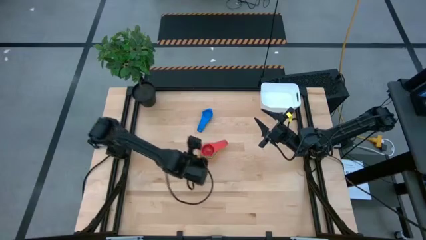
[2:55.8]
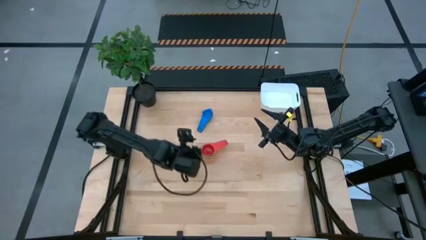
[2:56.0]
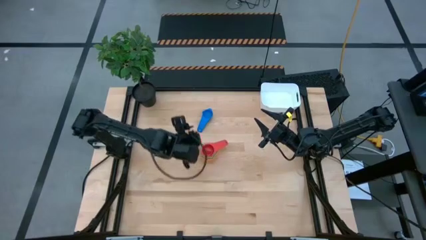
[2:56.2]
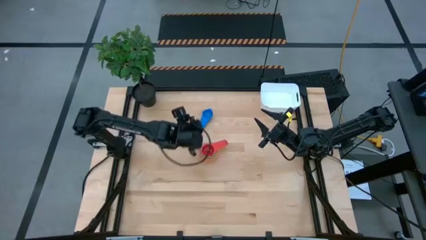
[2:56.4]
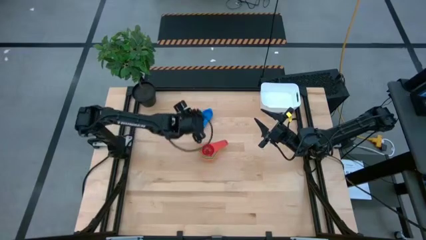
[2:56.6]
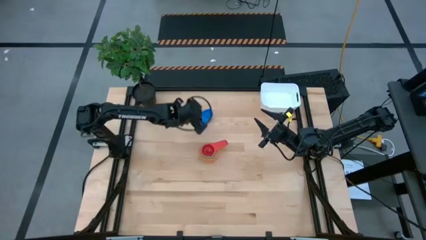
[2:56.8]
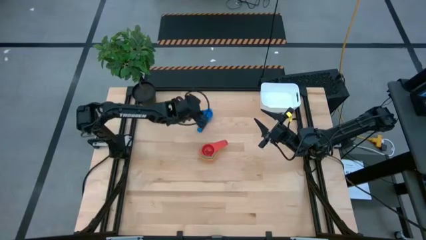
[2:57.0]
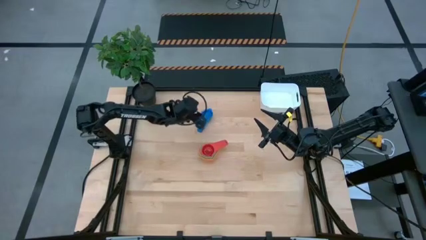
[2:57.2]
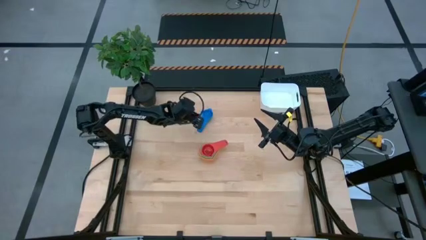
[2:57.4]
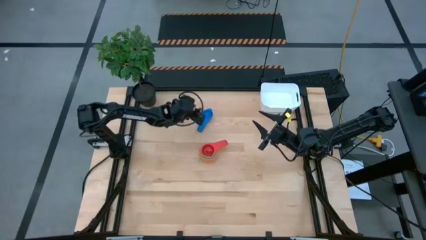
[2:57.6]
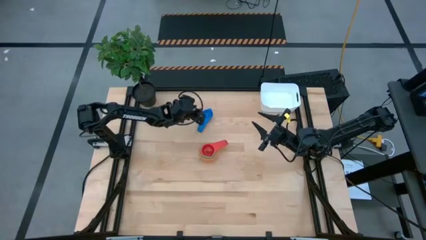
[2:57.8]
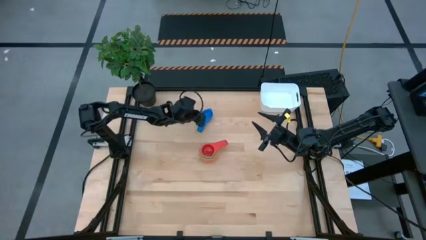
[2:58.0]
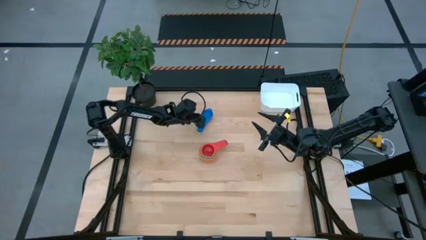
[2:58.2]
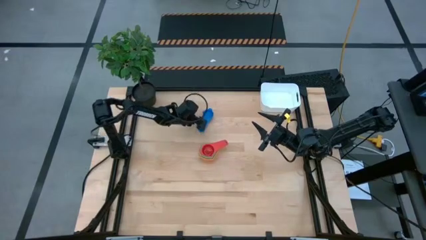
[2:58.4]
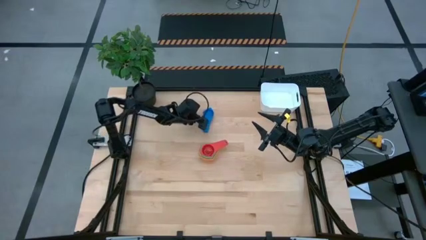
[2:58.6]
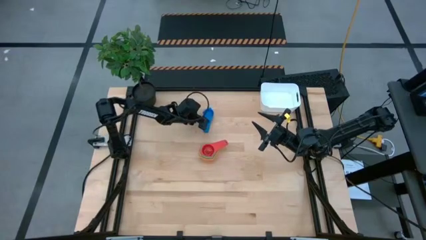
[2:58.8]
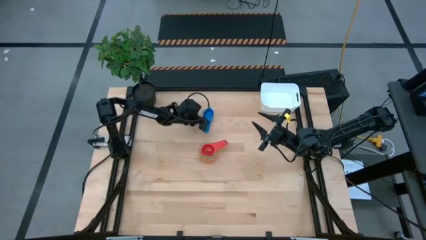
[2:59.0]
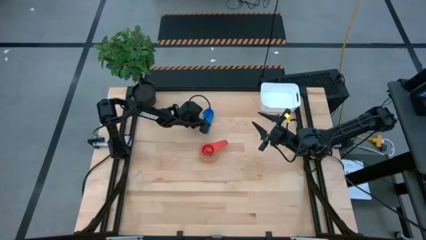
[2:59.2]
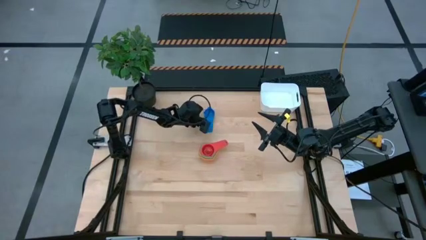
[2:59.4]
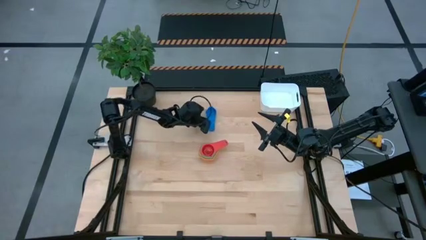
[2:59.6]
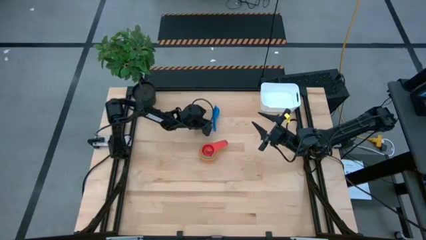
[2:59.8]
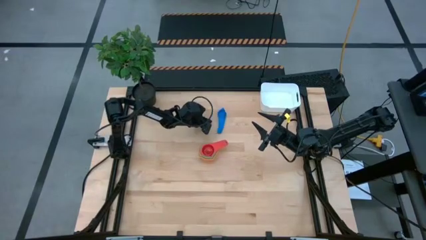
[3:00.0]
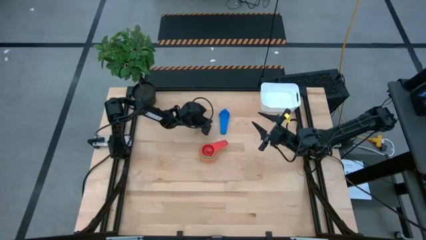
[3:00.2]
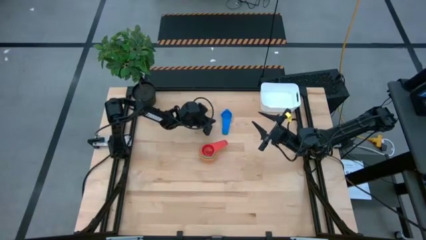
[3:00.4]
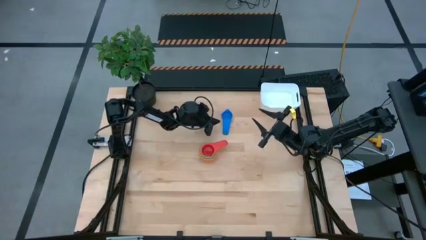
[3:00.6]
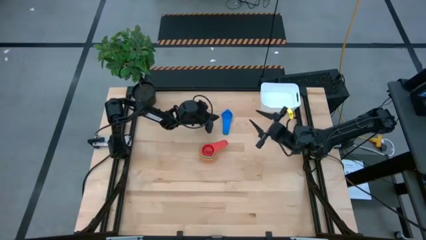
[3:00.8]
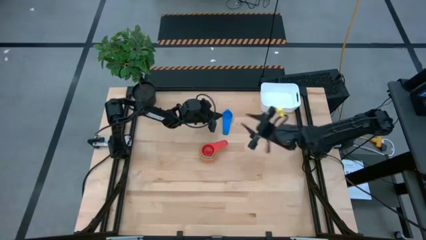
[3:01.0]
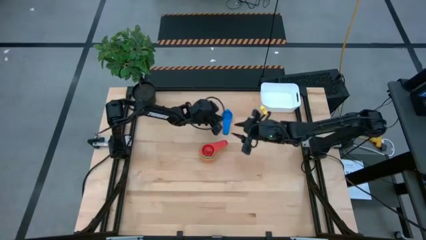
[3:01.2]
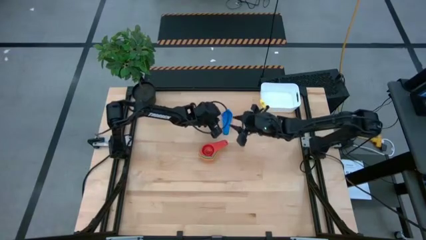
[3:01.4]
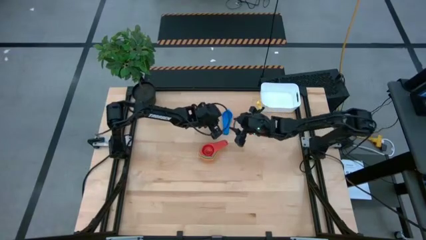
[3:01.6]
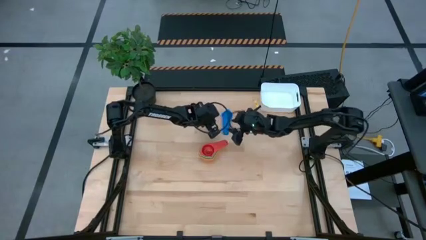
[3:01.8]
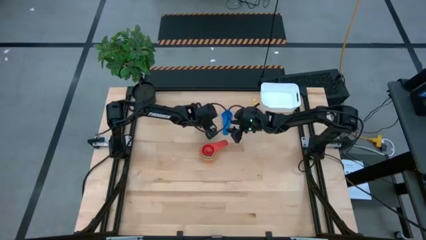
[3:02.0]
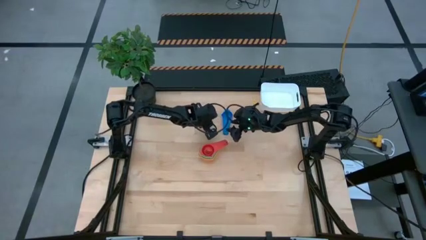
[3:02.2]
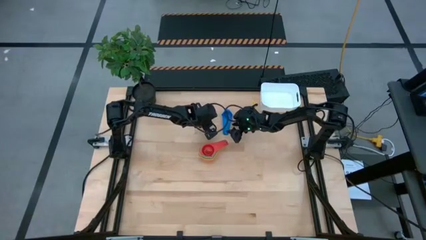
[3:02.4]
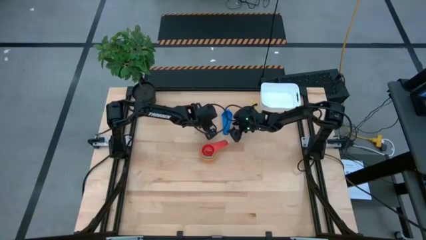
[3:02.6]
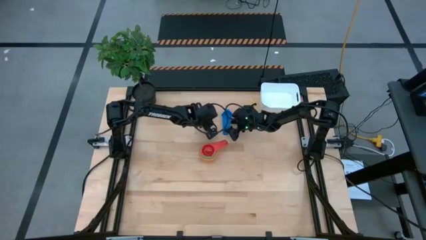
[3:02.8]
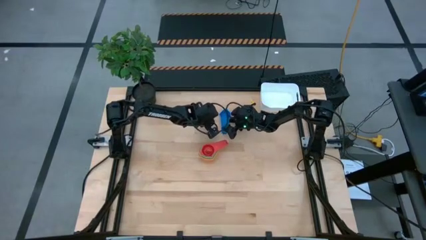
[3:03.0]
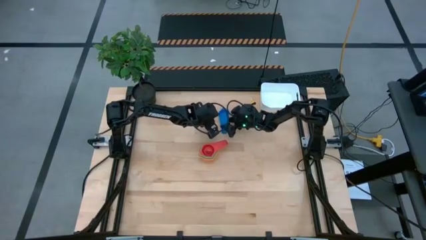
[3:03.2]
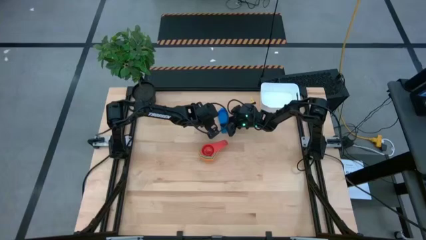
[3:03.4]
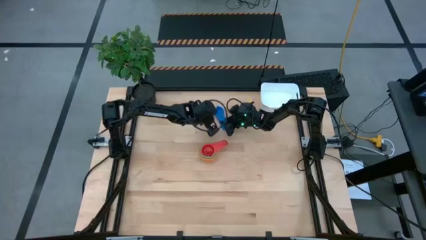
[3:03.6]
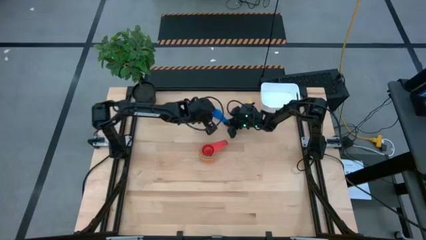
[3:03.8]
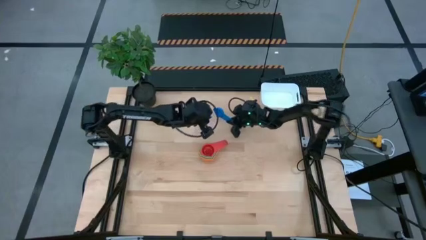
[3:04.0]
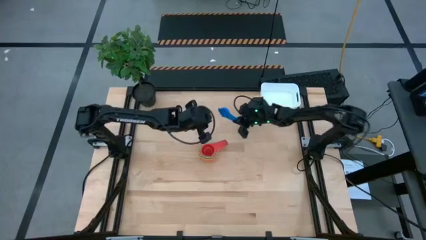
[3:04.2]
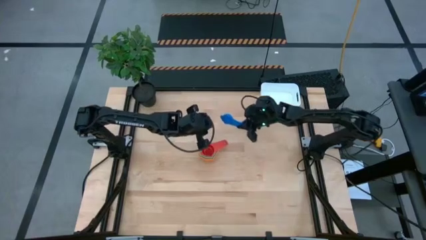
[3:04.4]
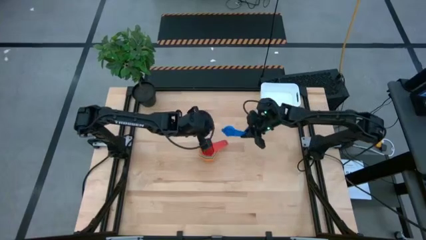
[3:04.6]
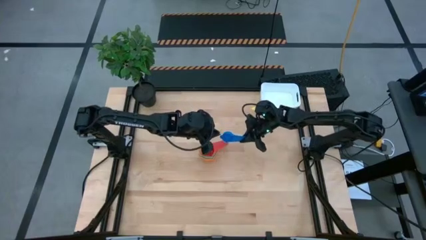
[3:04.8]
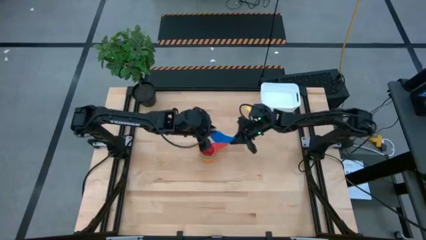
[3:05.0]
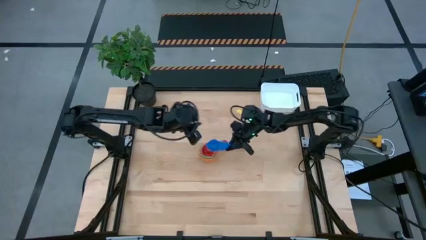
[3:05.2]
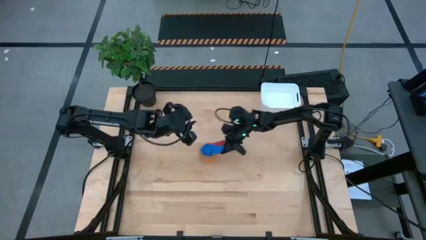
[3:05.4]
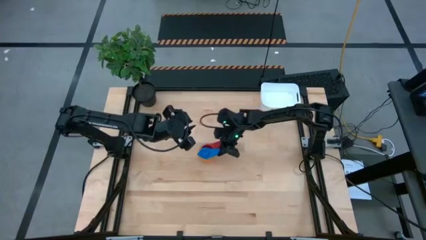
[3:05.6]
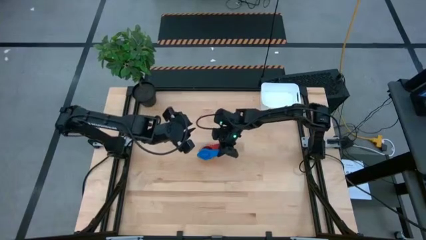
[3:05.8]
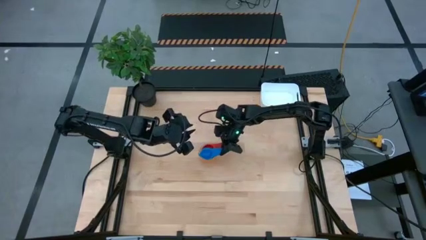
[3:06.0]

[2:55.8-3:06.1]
Task: Nest measuring cups in basket
Stack the blue measuring cup into the red measuring cup
